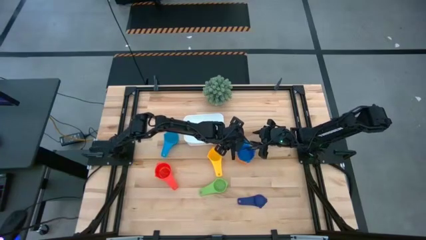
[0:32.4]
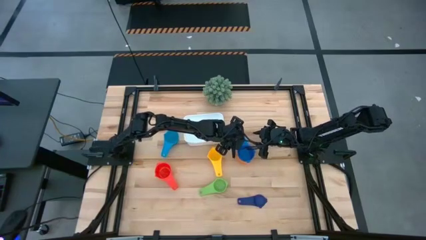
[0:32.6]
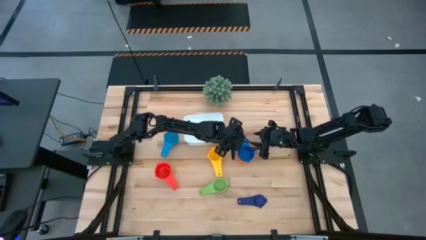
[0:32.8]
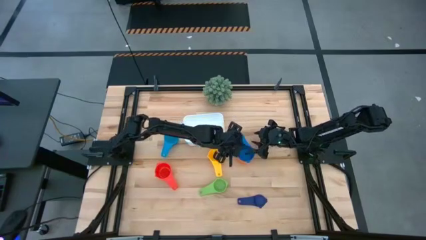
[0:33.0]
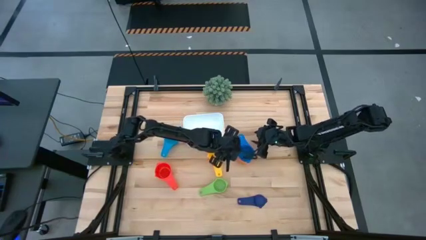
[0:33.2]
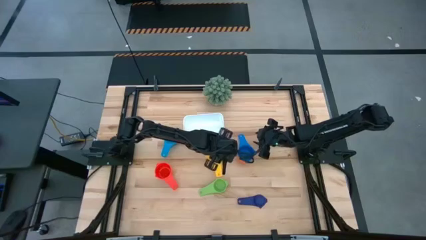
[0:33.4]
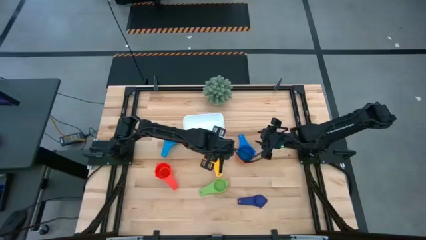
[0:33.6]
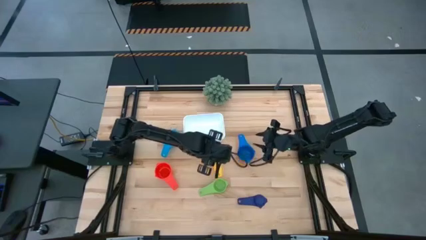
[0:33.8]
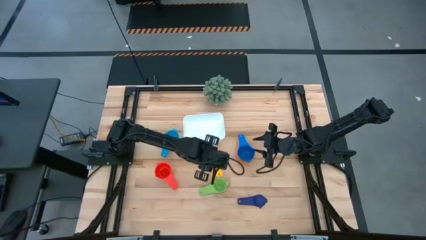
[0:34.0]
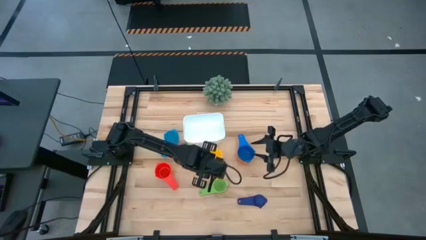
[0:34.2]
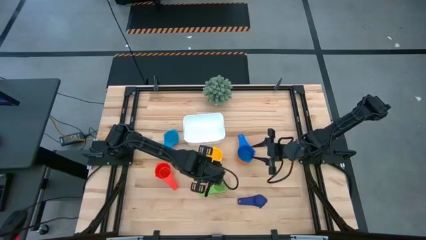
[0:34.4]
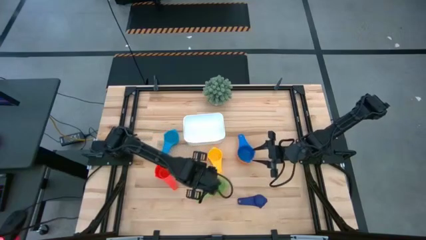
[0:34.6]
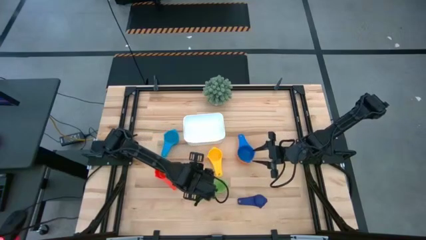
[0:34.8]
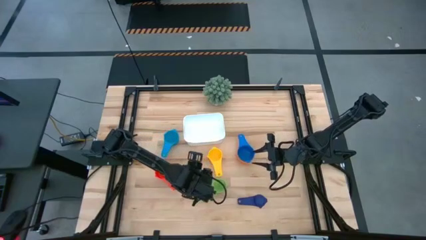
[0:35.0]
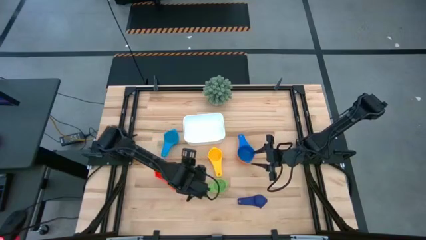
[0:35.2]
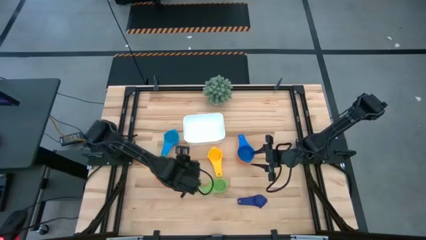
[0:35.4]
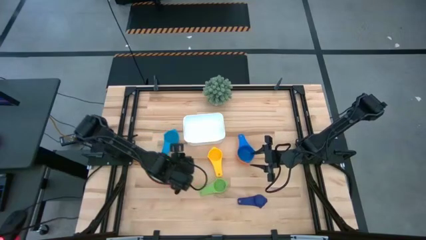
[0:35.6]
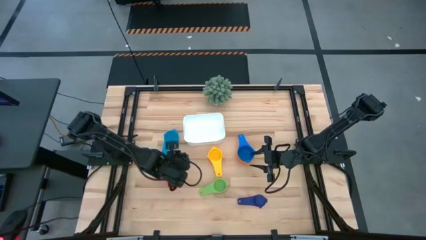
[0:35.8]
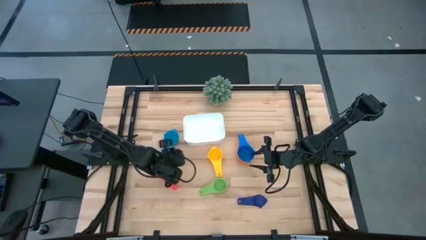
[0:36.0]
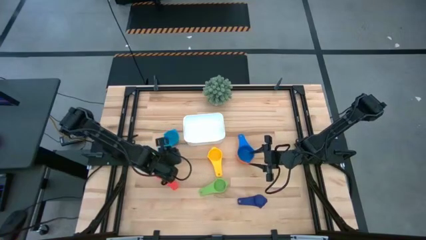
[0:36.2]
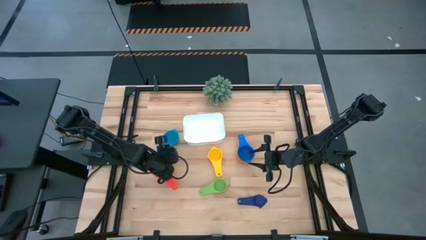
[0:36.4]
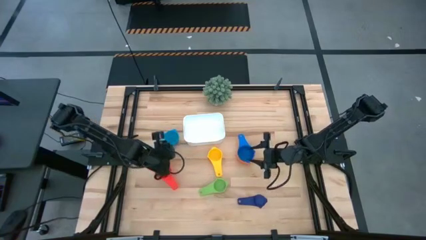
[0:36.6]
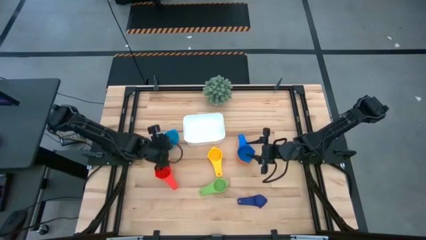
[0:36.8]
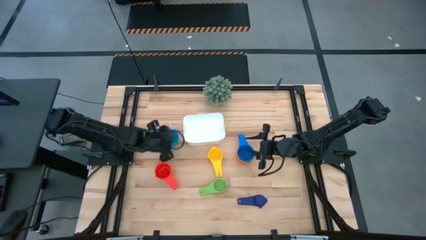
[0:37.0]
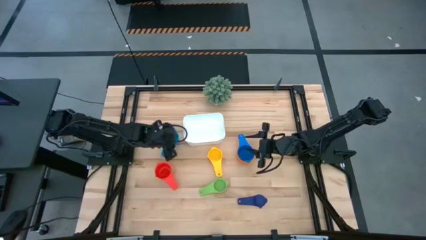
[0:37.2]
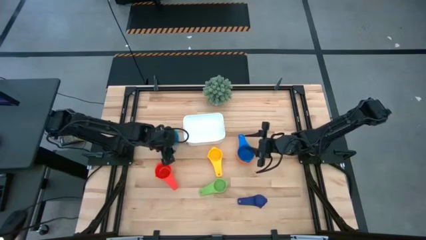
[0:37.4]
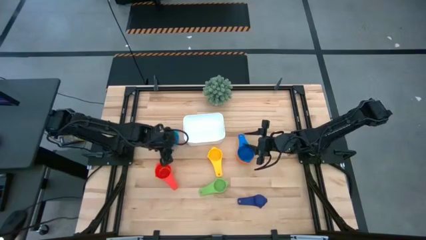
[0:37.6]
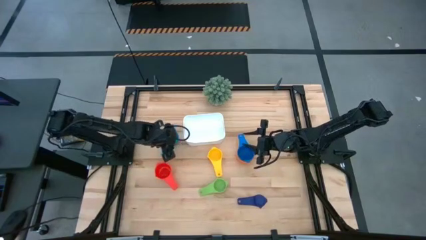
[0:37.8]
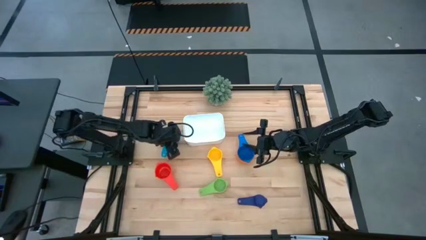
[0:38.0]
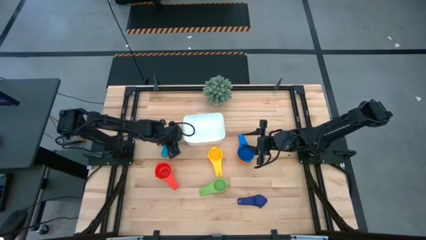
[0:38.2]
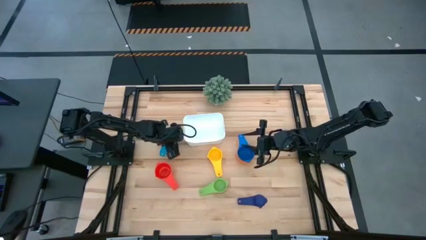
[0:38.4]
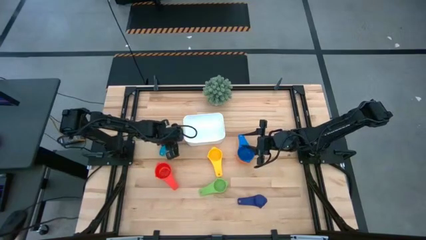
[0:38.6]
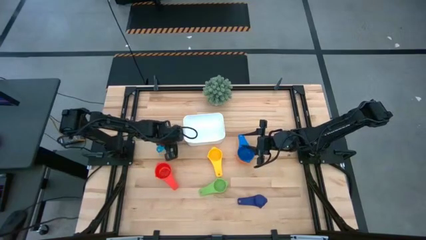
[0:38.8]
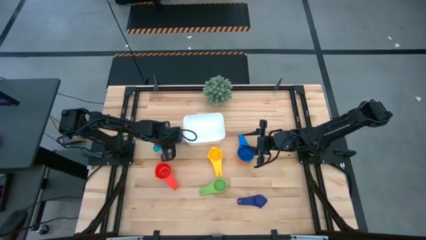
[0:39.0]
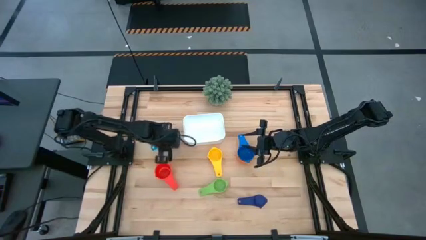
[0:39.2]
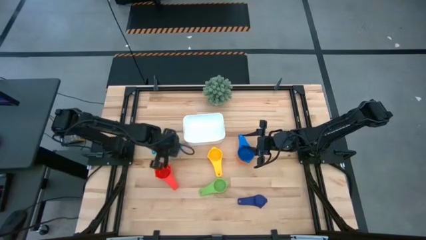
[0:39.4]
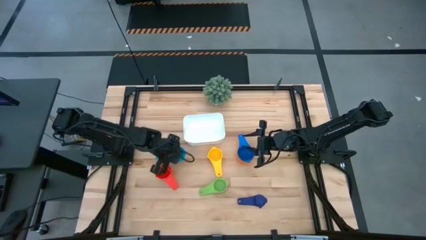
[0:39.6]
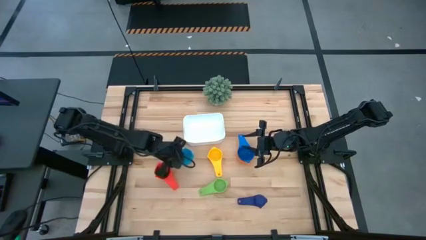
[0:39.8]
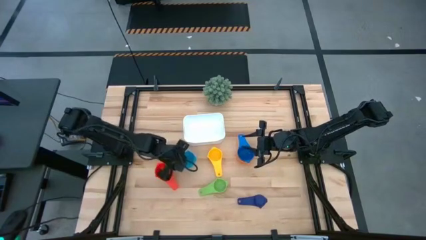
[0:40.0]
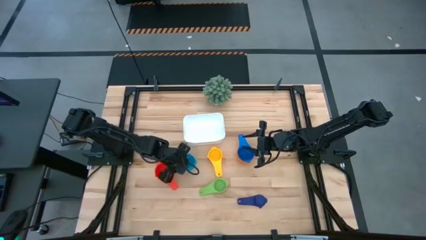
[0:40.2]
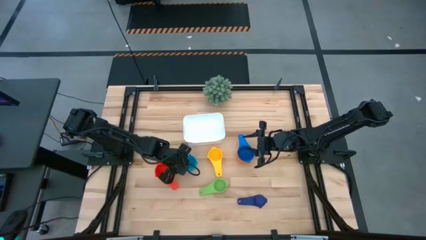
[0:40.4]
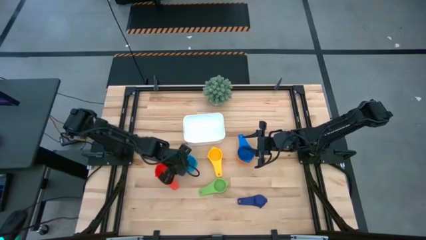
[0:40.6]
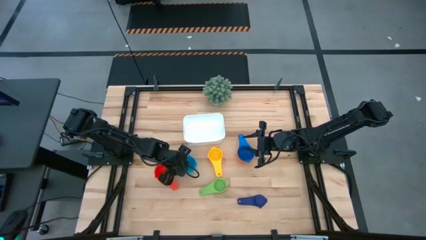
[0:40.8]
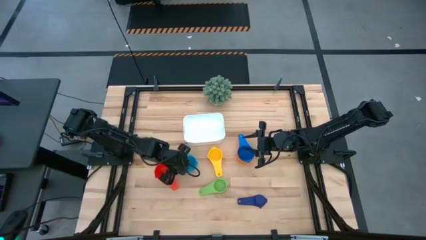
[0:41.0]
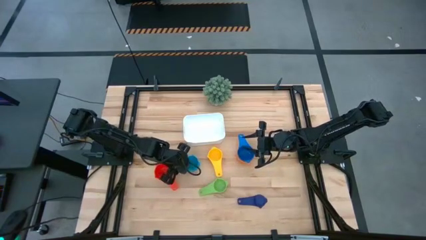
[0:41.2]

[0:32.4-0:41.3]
Task: Nest measuring cups in basket
Move the top blue nesting cup to the middle

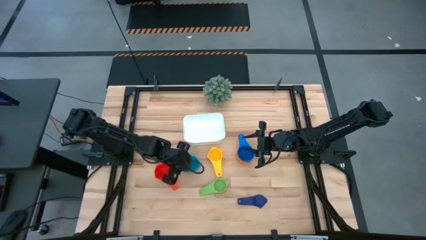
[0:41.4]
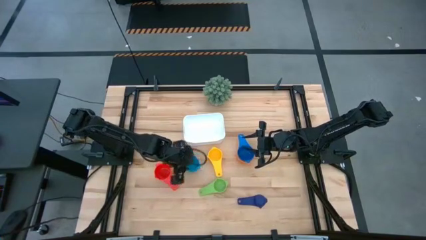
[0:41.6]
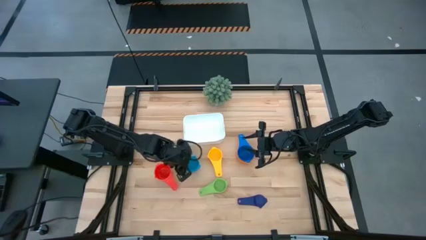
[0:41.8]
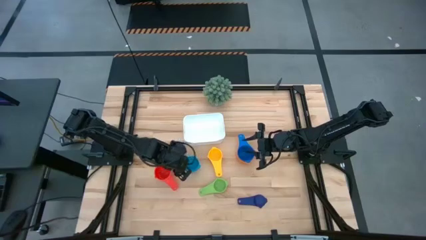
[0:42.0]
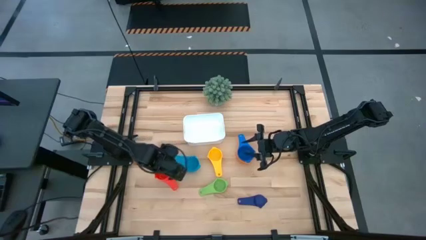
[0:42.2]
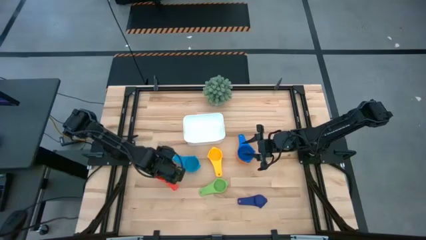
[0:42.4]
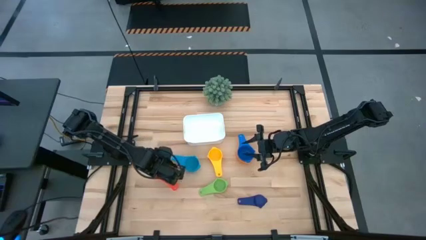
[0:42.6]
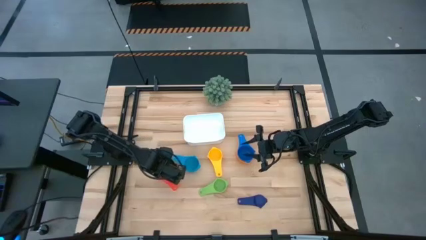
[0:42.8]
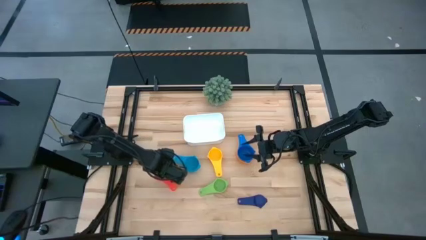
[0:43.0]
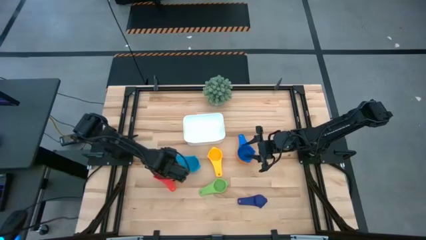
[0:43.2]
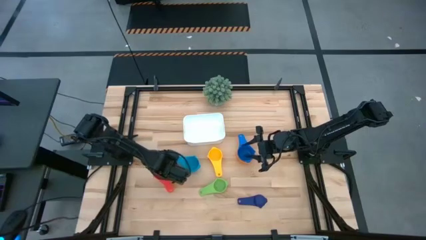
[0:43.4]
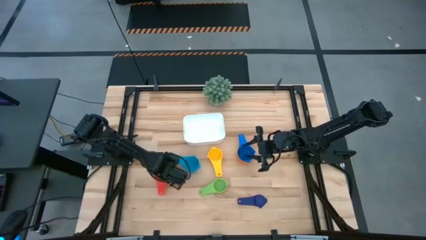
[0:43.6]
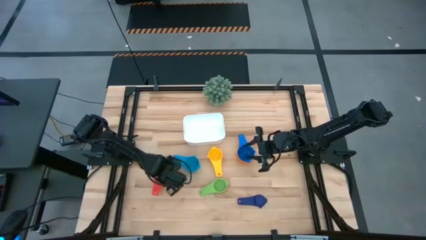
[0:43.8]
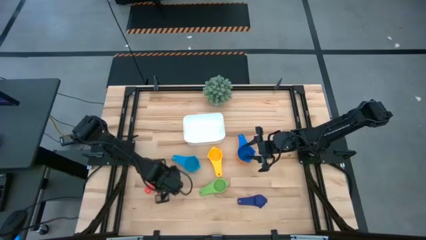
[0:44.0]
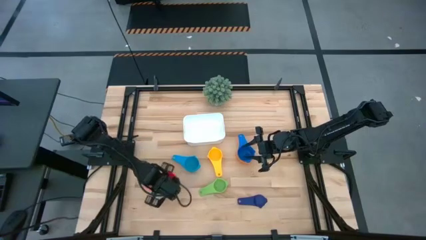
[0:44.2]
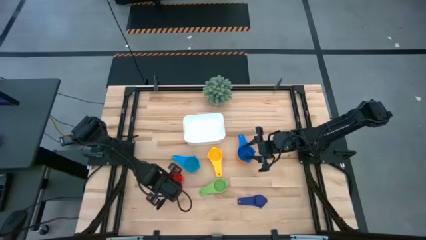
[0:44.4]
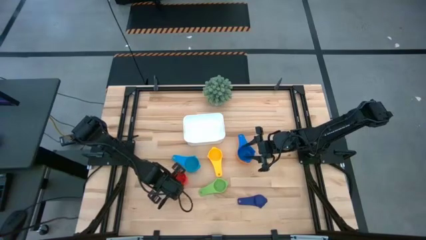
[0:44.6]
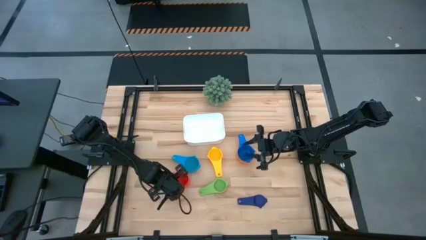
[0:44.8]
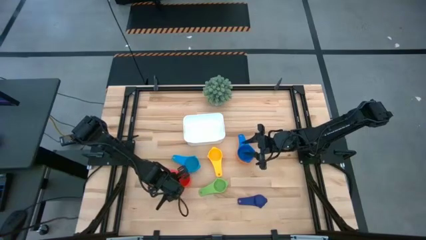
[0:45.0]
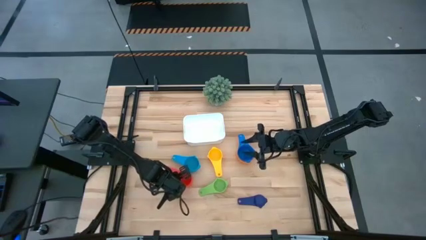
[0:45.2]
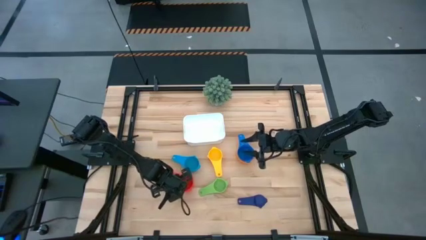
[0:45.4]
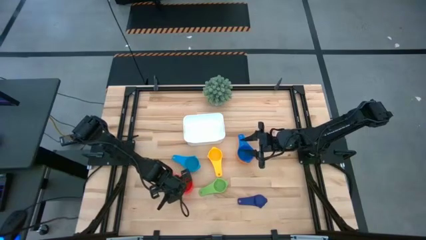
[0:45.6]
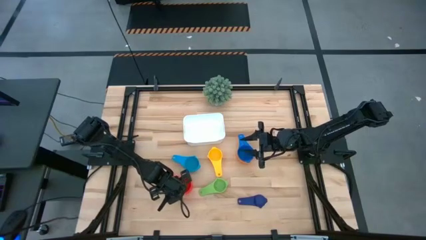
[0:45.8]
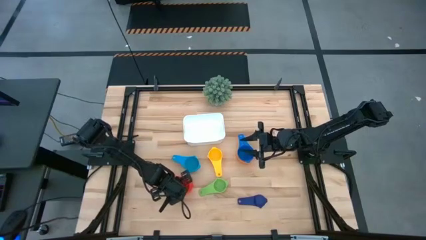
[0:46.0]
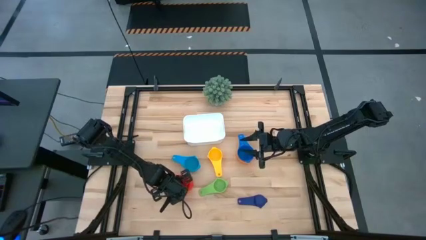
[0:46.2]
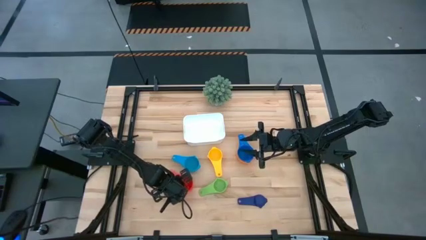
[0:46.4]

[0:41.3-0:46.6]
Move the red nesting cup next to the top blue nesting cup

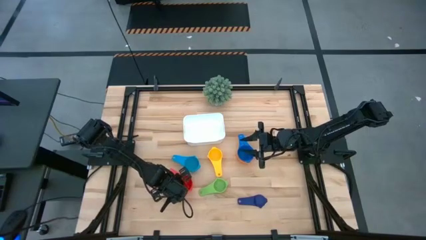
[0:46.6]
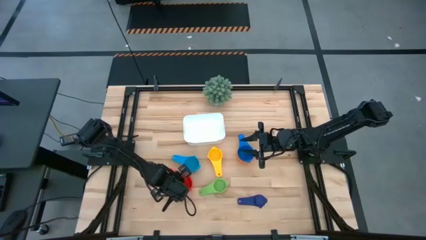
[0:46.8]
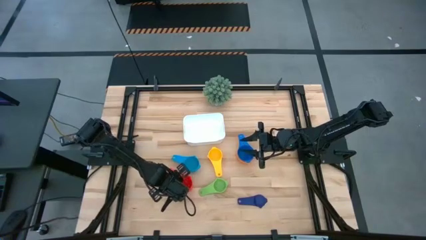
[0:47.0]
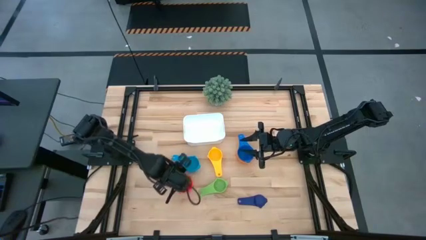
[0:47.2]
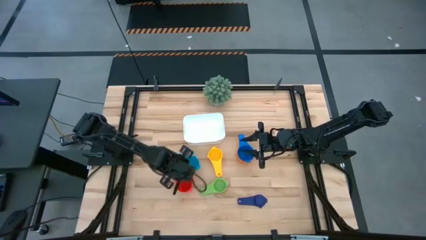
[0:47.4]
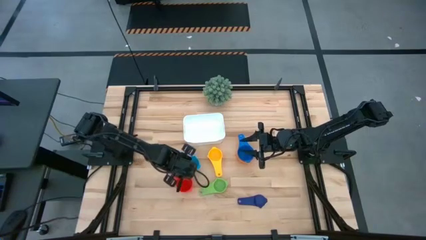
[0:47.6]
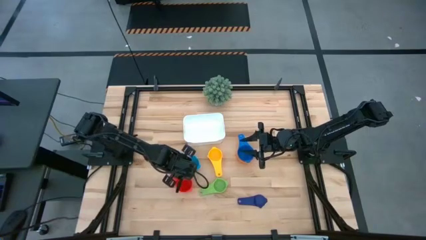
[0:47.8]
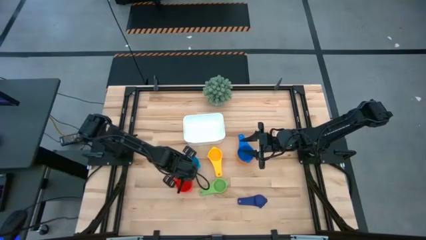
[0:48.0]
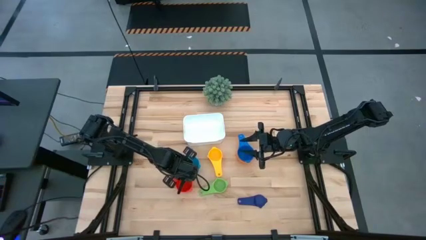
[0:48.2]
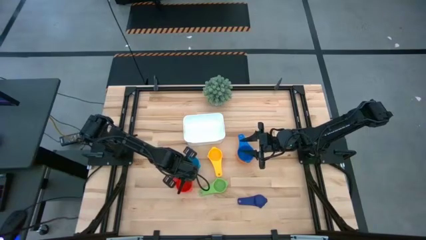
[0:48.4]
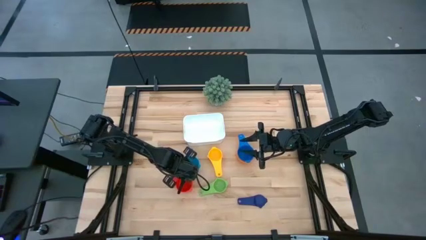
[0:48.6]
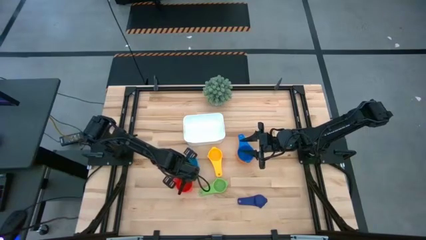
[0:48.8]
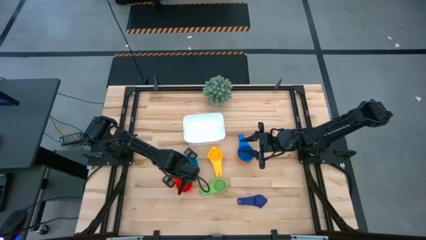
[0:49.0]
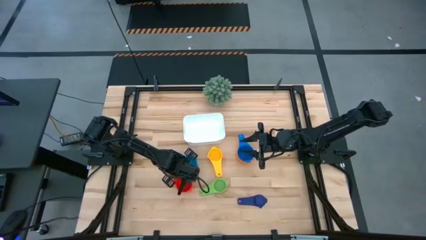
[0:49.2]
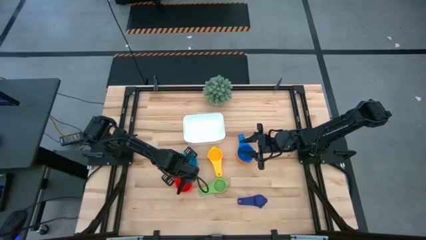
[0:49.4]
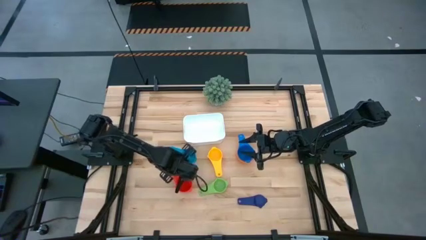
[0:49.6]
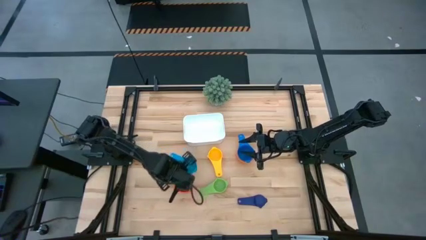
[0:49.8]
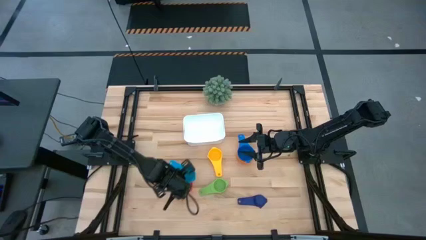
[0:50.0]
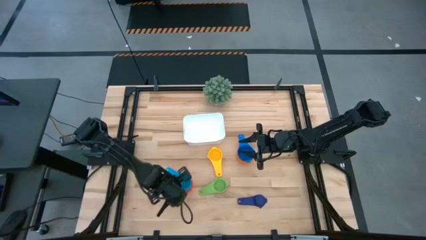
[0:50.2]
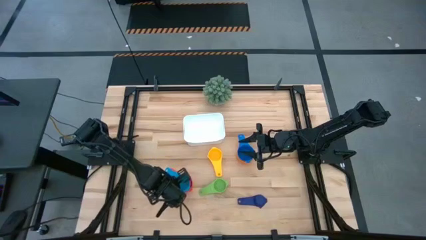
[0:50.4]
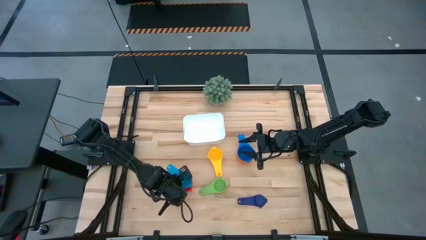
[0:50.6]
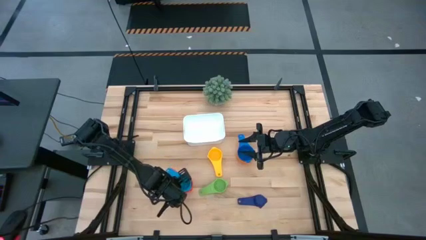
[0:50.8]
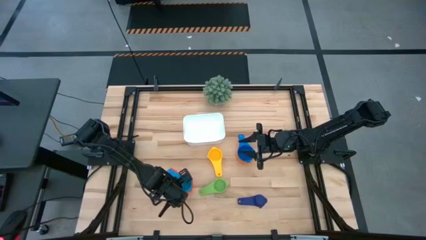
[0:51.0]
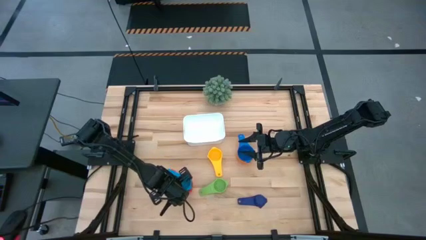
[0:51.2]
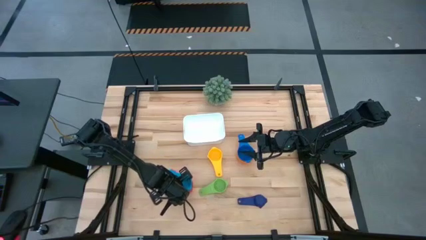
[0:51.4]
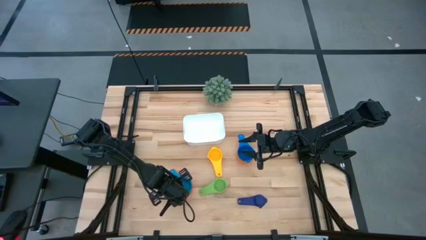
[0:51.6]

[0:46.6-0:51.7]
Stack the left blue nesting cup on the red nesting cup
